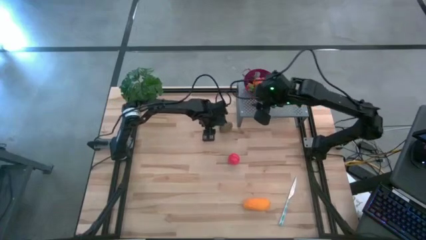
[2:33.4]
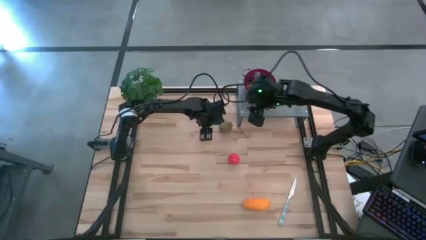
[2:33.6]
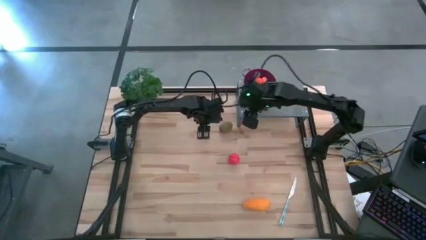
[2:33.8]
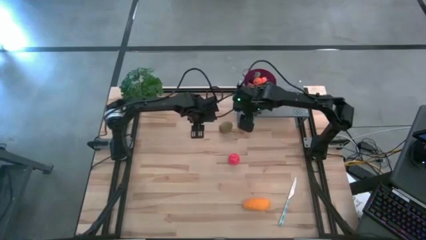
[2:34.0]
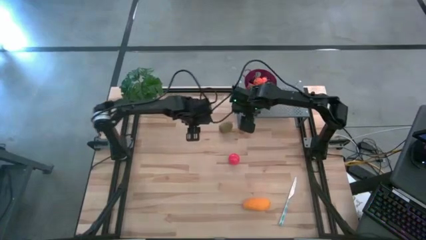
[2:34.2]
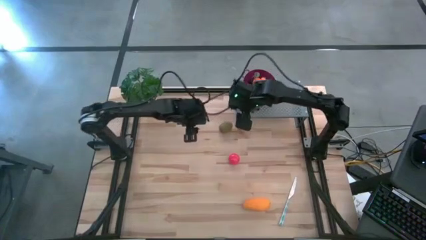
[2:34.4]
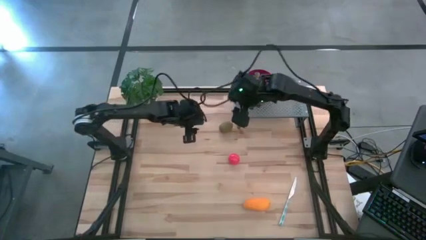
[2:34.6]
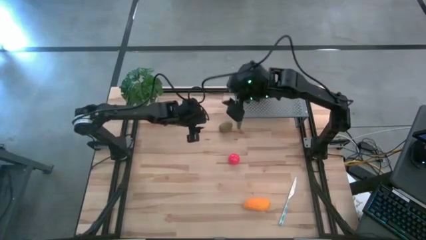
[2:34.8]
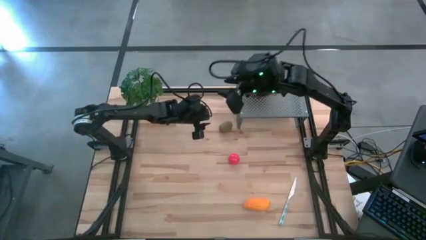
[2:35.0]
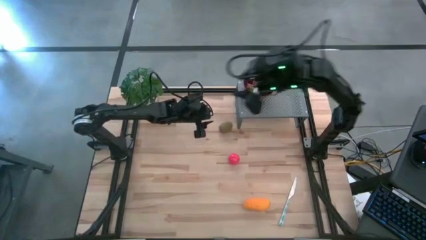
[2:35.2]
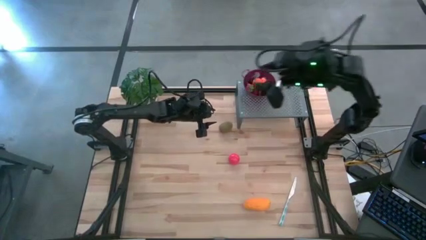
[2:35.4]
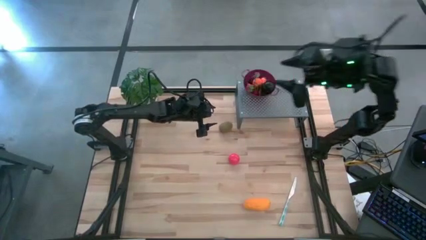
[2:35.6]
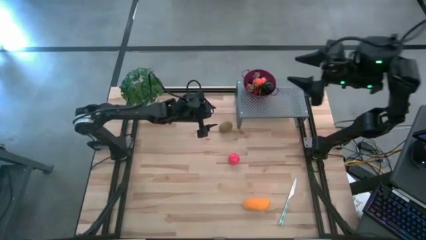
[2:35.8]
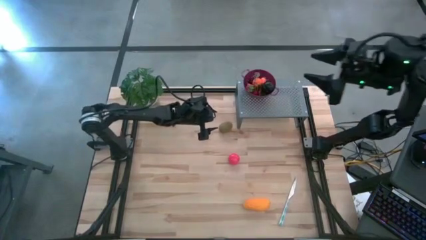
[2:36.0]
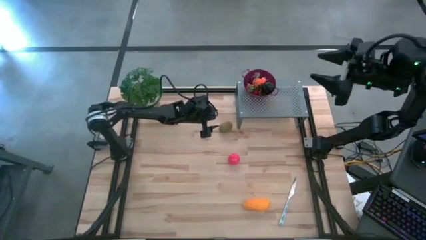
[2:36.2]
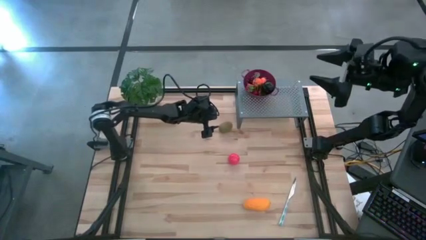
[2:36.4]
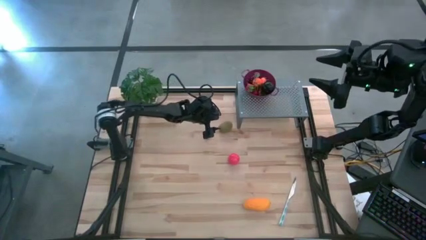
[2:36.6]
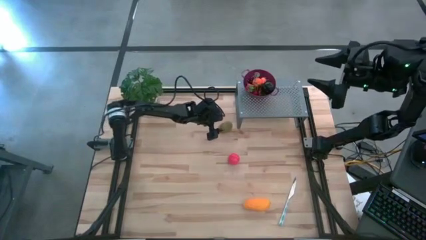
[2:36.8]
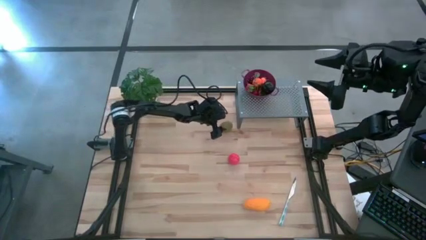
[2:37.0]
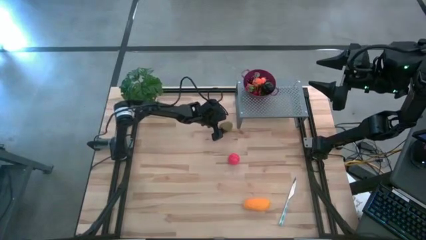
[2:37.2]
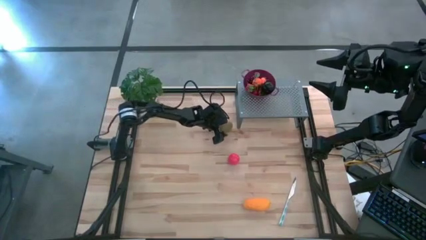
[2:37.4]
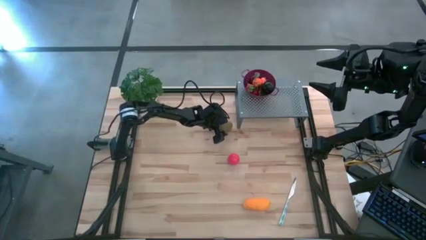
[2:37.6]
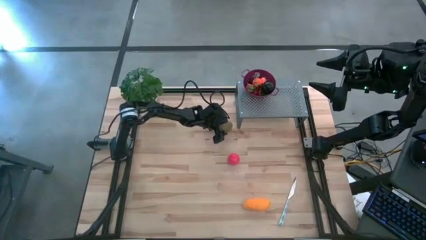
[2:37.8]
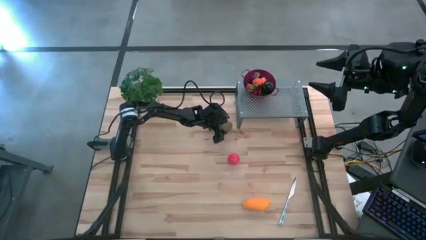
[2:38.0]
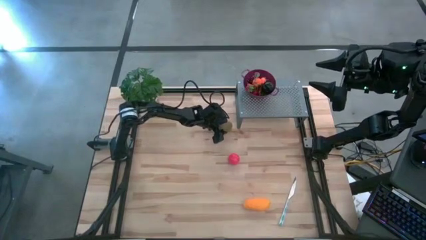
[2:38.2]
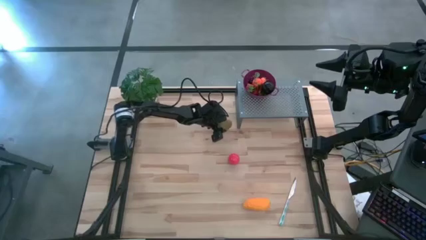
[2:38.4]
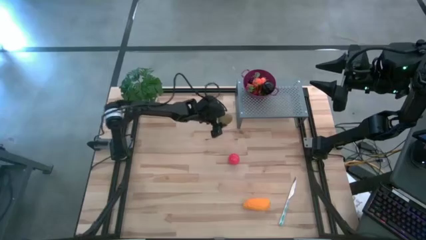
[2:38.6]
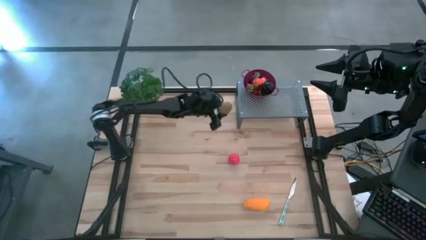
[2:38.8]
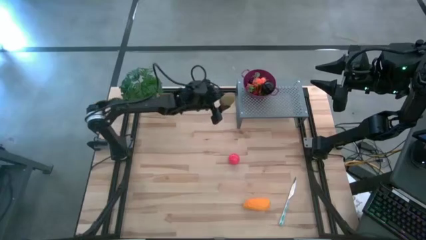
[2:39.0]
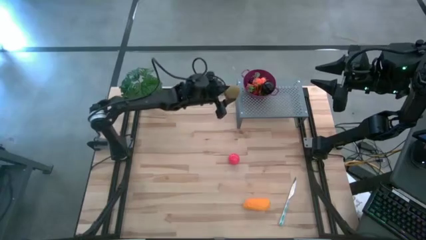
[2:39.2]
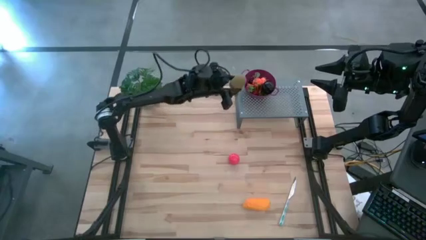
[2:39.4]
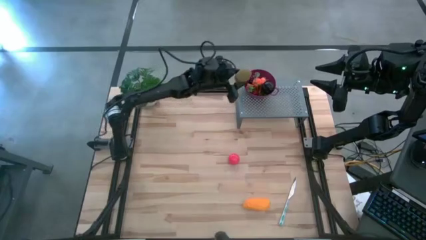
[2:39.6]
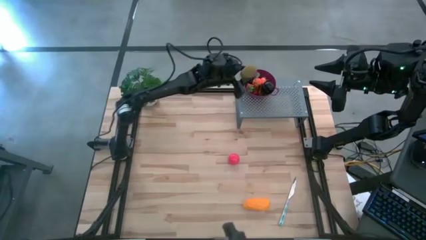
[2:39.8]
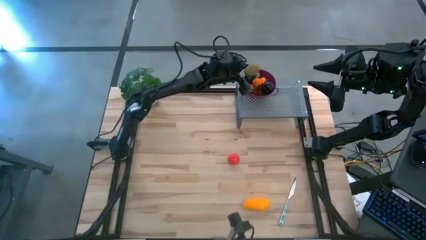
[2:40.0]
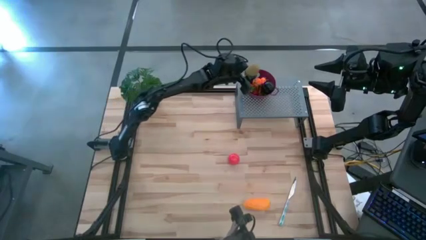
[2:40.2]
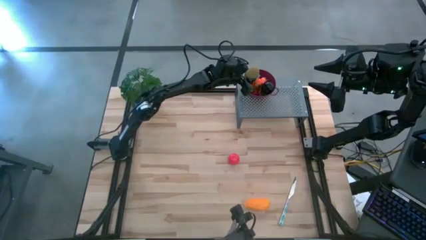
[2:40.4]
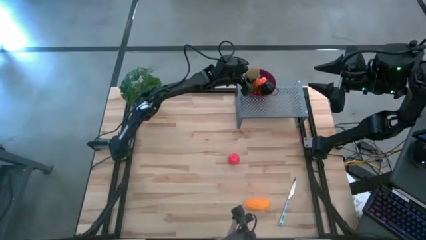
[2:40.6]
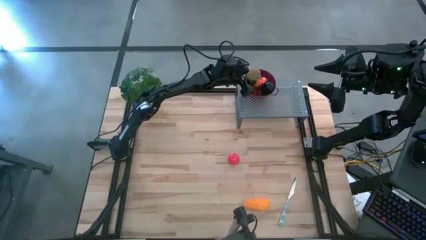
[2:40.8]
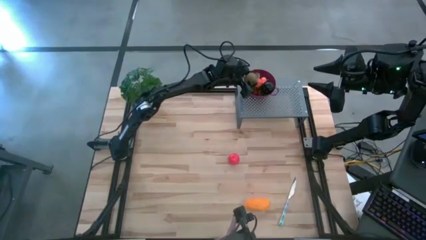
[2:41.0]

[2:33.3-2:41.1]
Task: Pick & Place Fruit
Put the kiwi into the violet strainer bowl on the shelf

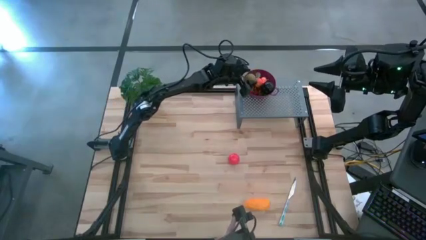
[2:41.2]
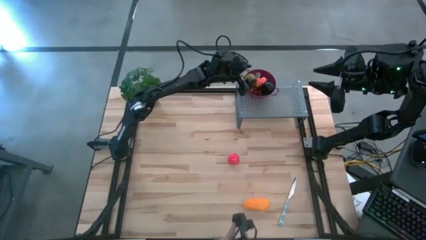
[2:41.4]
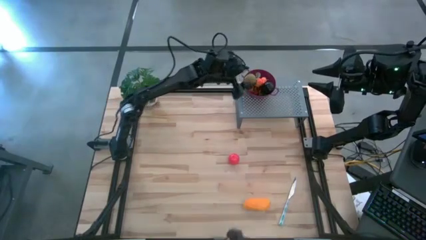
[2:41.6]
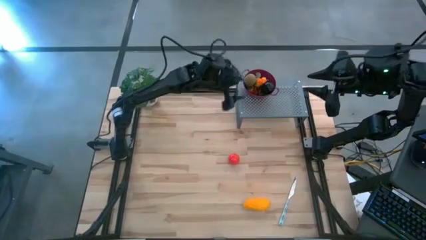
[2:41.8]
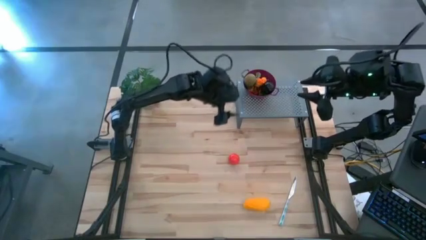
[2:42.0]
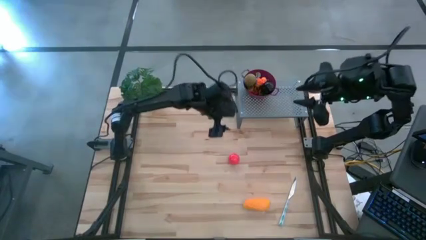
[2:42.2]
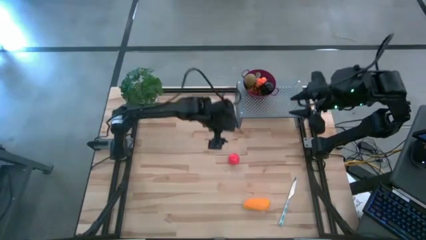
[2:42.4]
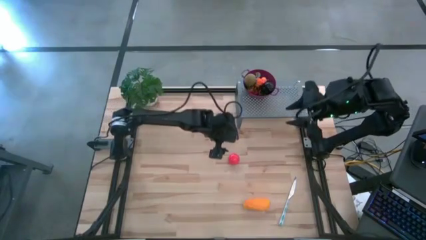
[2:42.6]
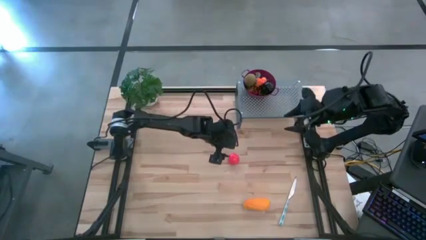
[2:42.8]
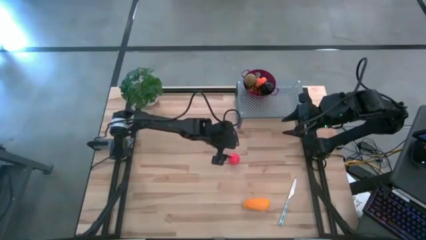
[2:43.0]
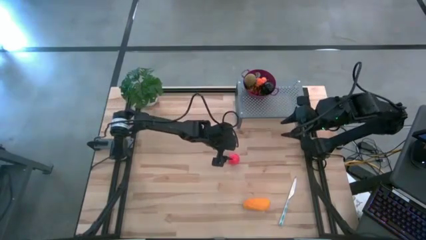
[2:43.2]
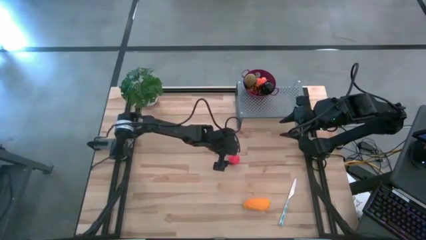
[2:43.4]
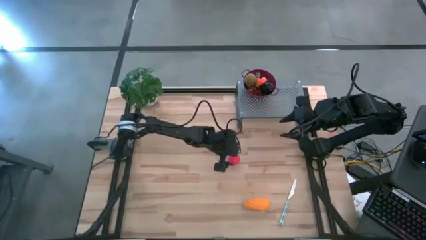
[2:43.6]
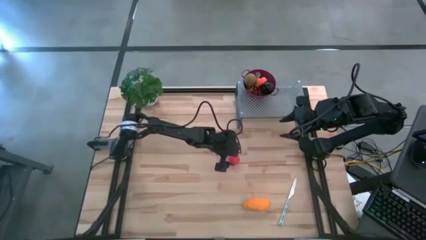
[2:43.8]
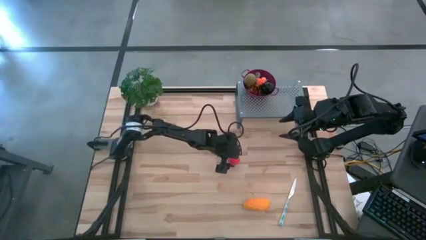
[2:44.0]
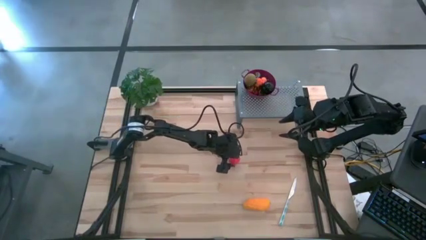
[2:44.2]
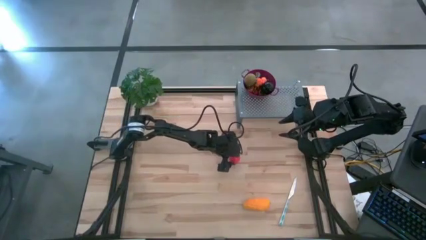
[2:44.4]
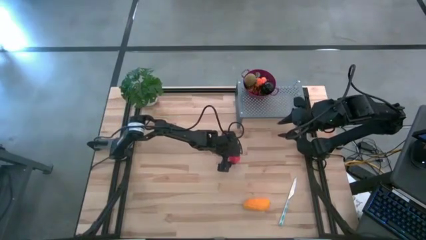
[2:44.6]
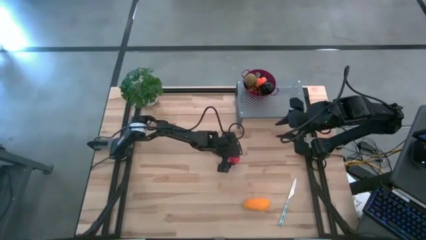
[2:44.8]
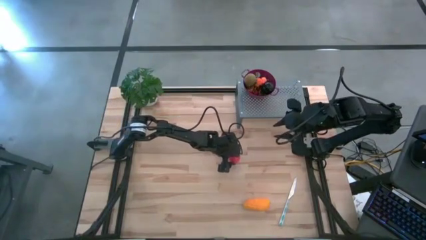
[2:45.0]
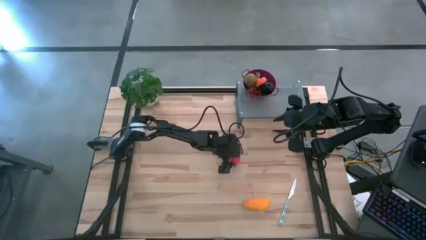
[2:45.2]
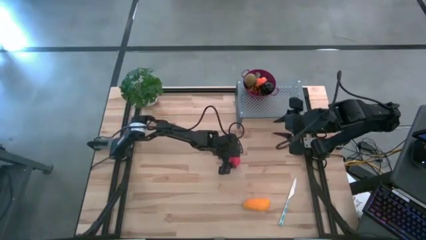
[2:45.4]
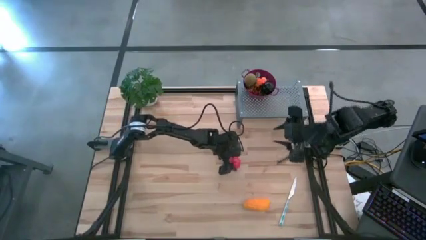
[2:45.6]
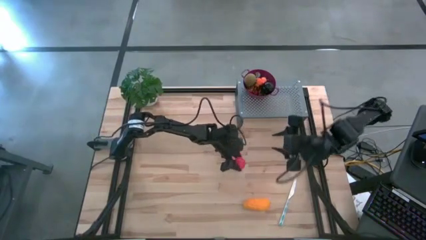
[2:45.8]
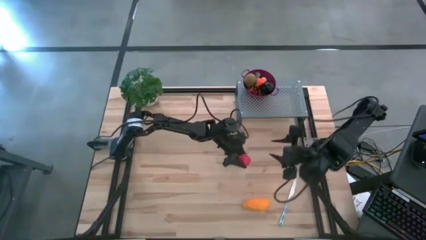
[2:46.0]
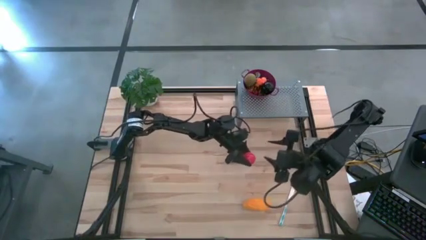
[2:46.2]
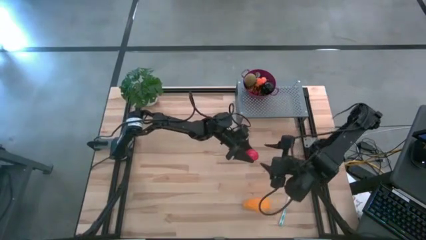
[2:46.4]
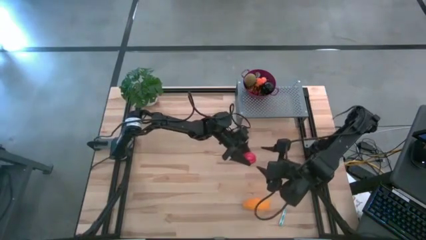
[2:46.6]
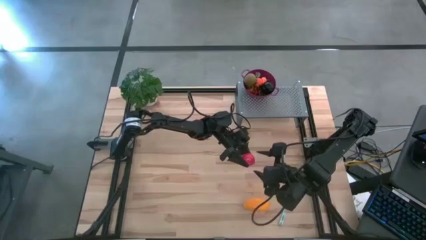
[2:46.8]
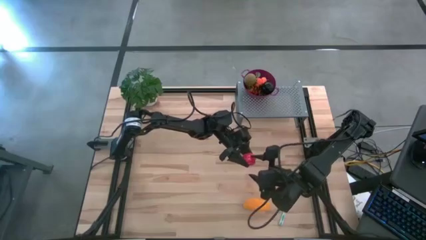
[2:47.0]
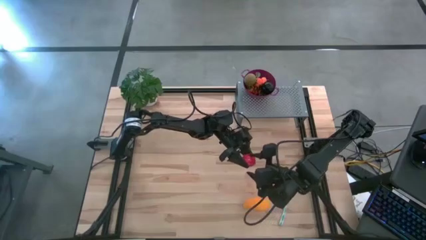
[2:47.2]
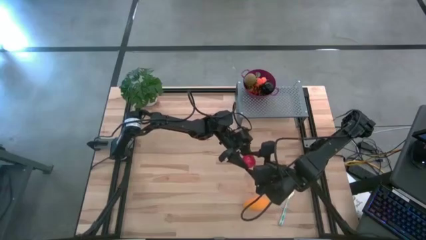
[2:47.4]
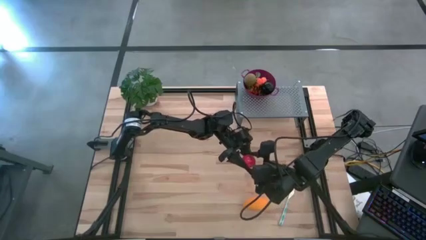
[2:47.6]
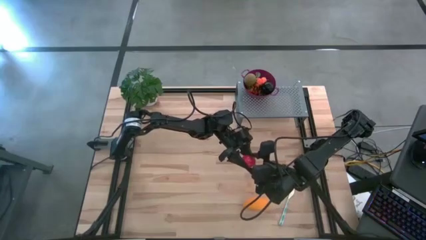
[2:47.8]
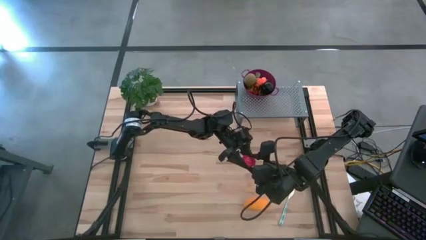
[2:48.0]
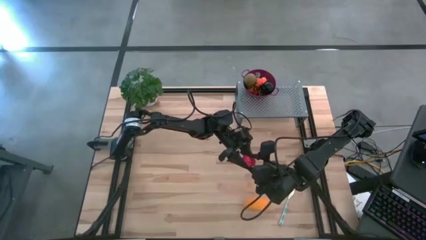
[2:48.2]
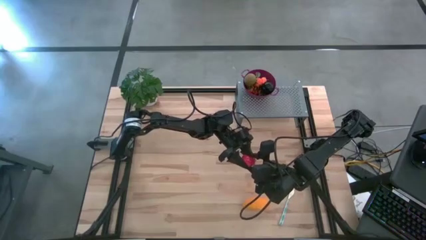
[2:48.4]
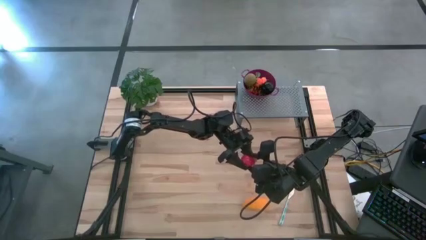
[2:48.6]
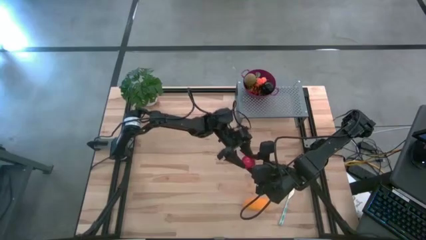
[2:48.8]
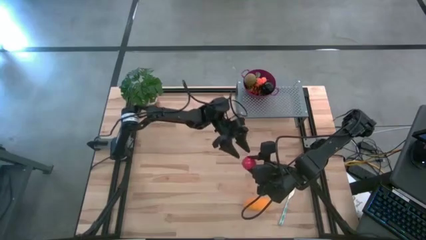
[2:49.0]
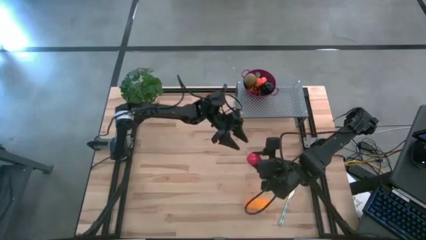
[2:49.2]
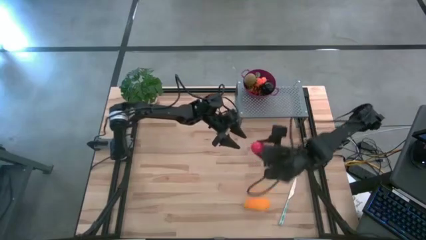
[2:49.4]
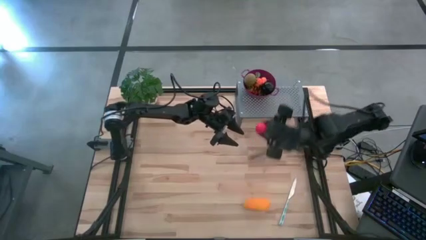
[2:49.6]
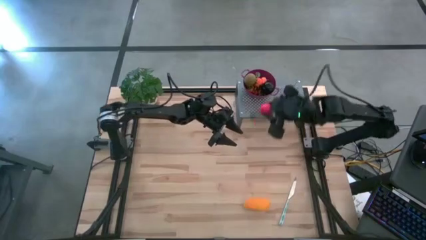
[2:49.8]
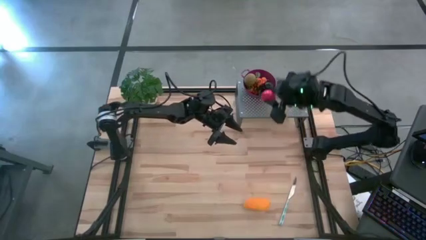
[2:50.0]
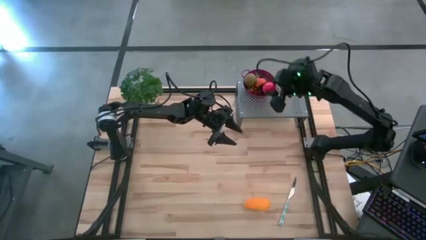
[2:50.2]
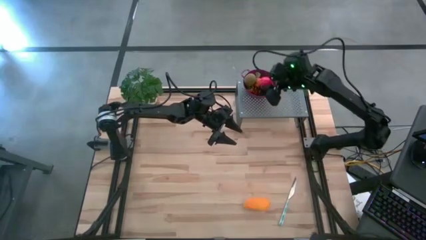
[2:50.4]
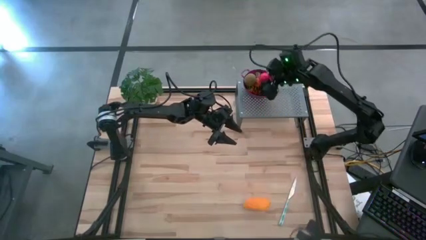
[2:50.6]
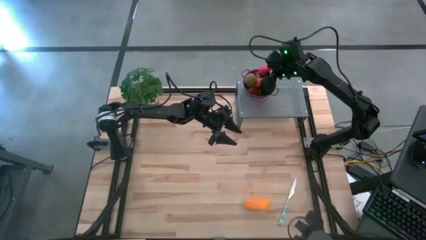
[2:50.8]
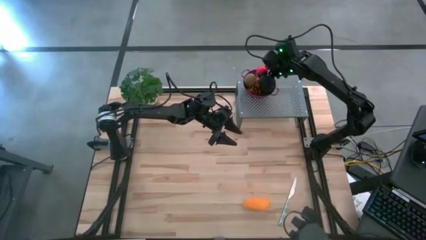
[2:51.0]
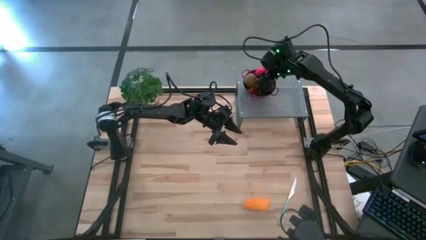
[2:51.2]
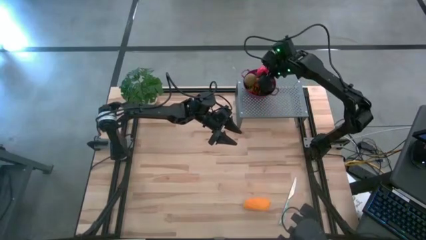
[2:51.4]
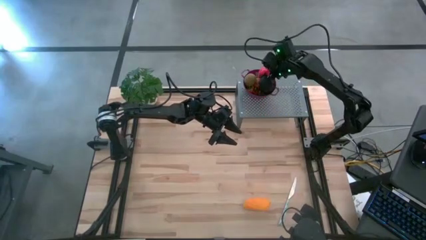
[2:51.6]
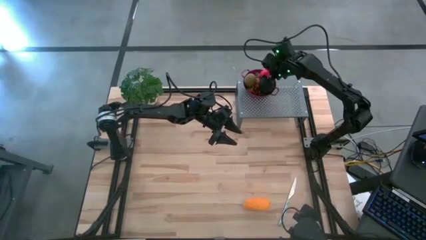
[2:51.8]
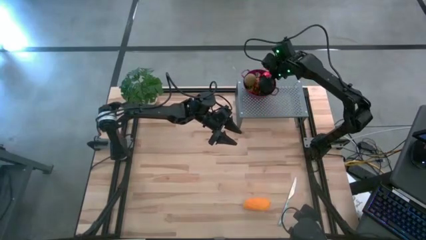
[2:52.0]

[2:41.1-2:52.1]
Put the tomato into the violet strainer bowl on the shelf
